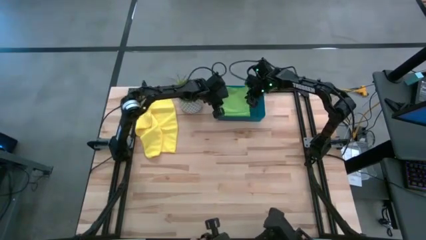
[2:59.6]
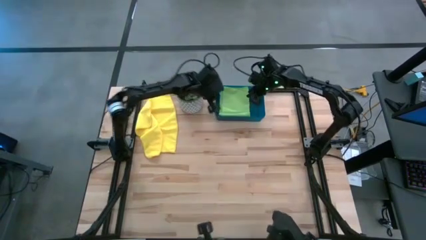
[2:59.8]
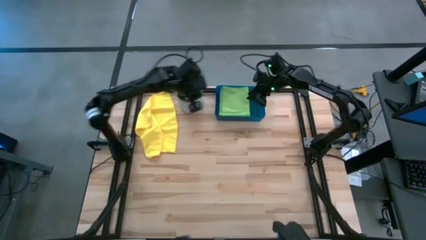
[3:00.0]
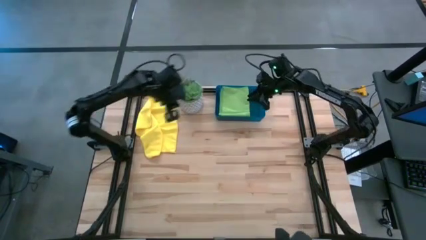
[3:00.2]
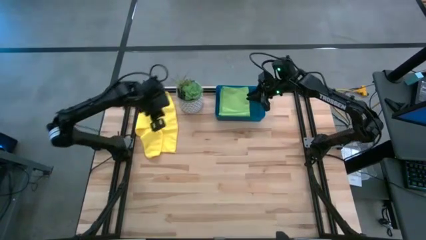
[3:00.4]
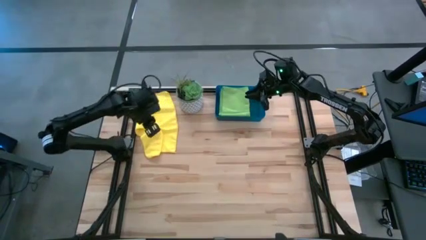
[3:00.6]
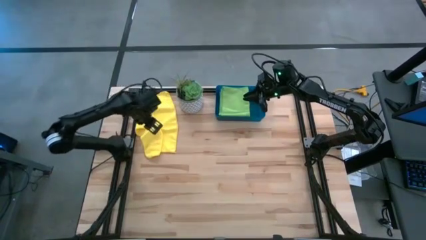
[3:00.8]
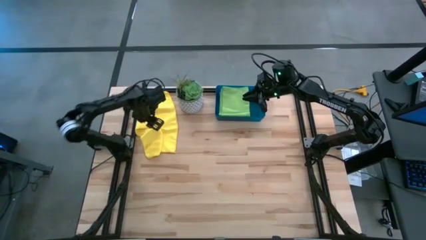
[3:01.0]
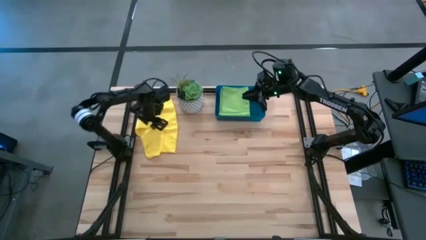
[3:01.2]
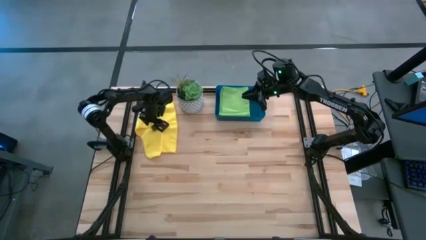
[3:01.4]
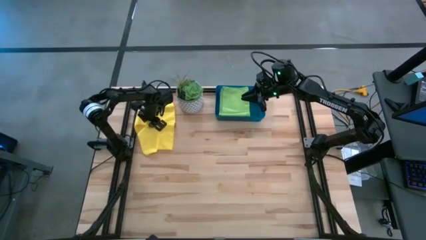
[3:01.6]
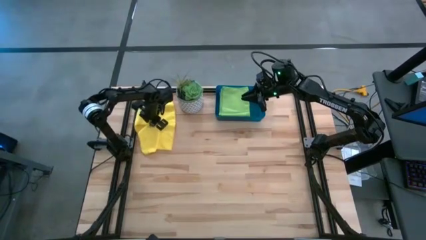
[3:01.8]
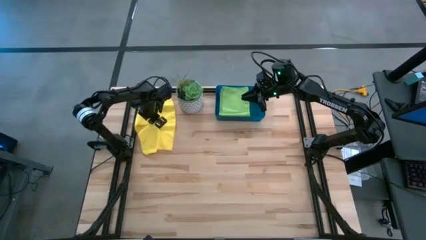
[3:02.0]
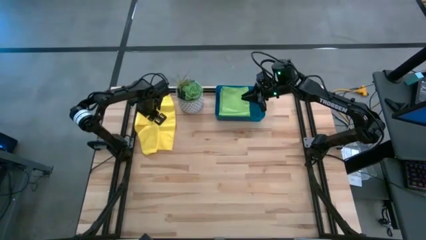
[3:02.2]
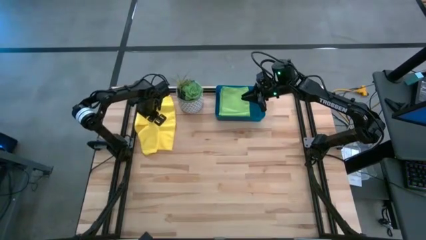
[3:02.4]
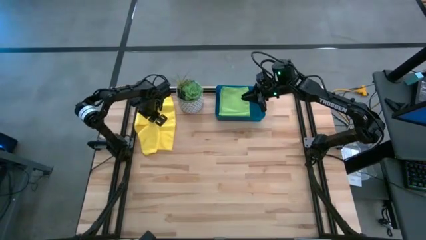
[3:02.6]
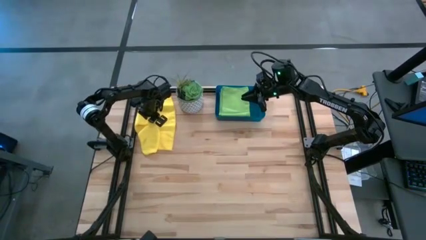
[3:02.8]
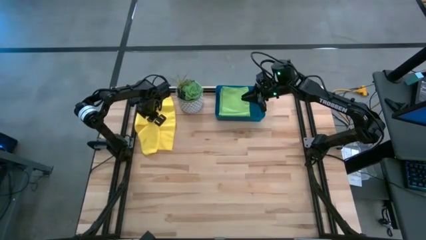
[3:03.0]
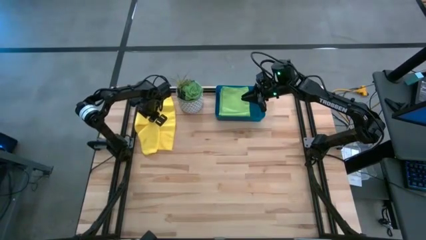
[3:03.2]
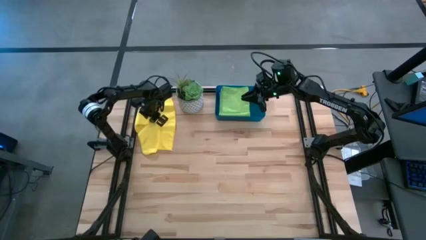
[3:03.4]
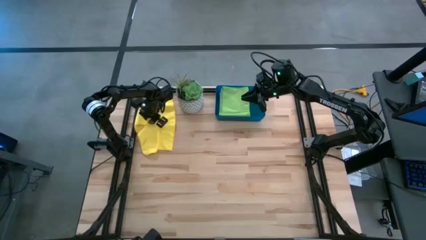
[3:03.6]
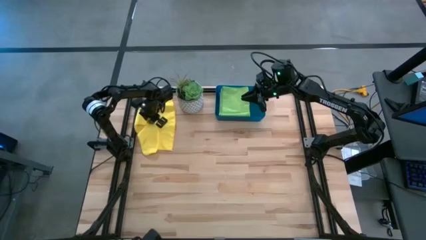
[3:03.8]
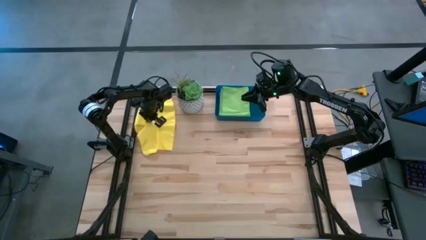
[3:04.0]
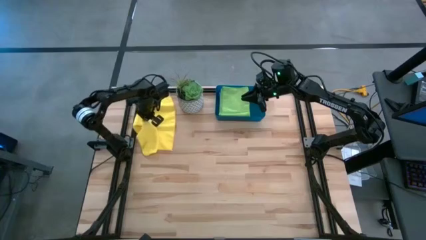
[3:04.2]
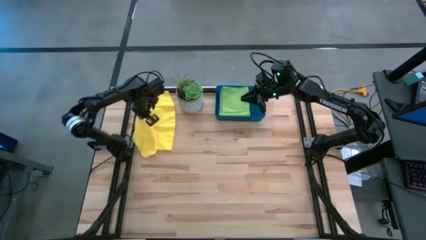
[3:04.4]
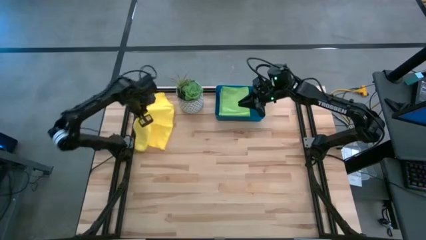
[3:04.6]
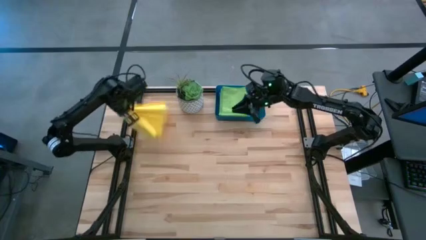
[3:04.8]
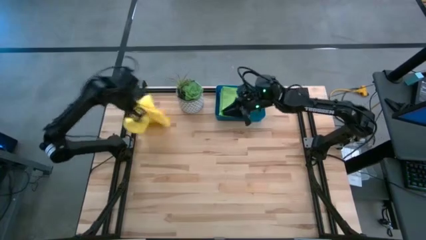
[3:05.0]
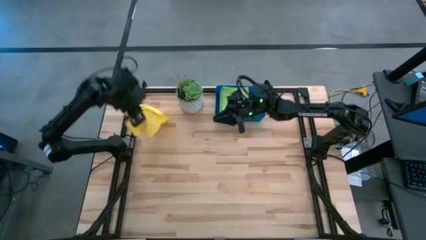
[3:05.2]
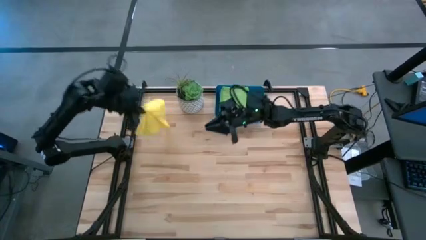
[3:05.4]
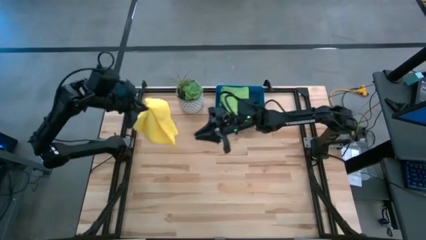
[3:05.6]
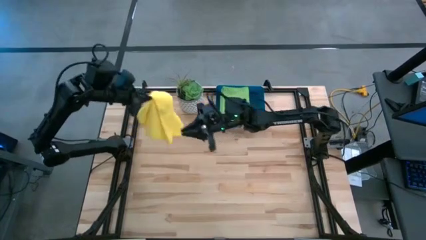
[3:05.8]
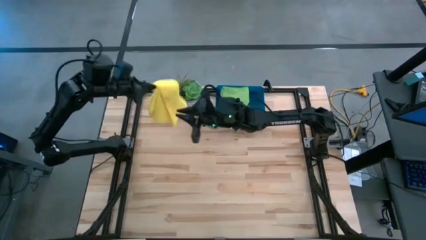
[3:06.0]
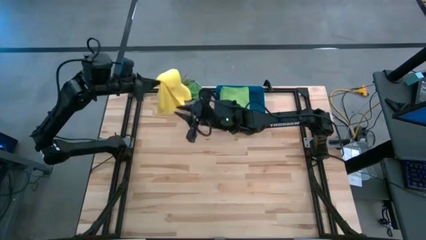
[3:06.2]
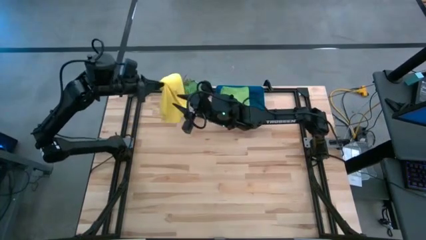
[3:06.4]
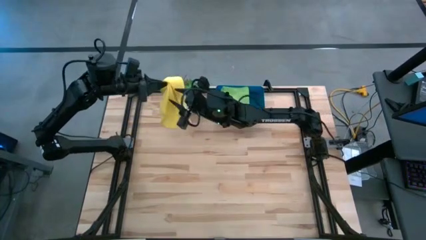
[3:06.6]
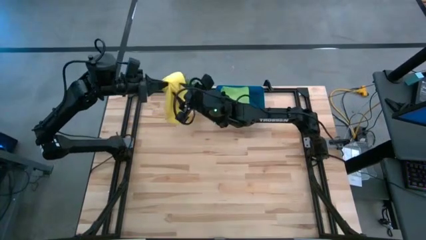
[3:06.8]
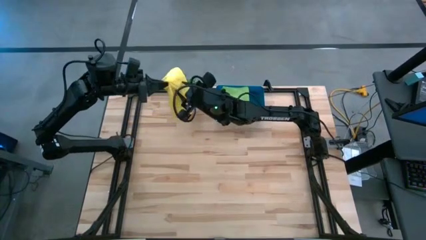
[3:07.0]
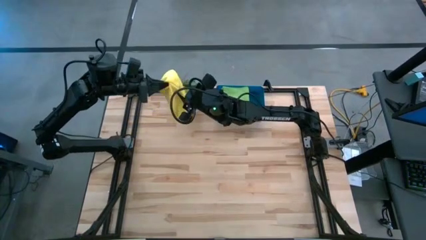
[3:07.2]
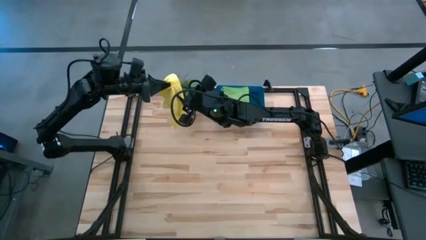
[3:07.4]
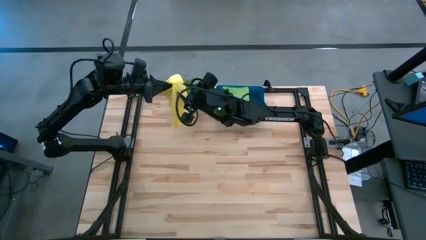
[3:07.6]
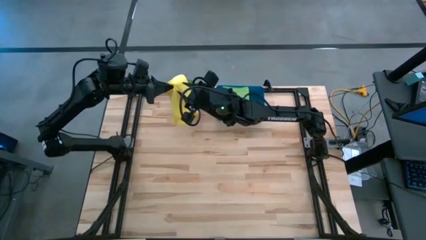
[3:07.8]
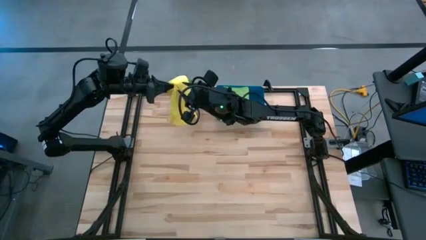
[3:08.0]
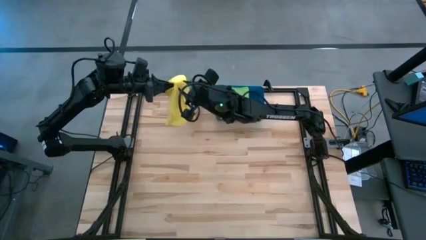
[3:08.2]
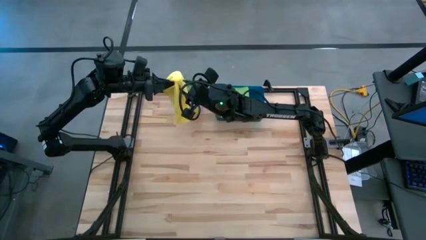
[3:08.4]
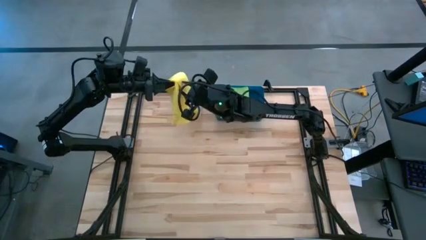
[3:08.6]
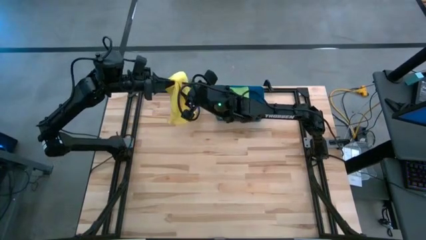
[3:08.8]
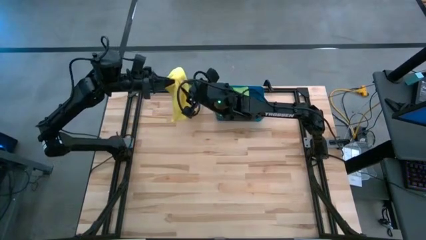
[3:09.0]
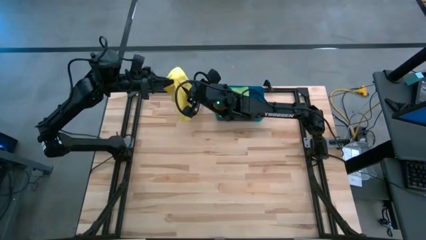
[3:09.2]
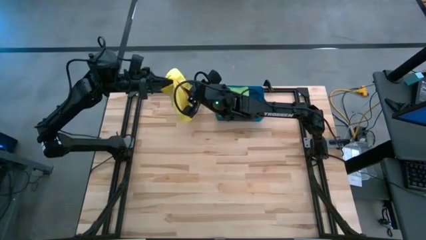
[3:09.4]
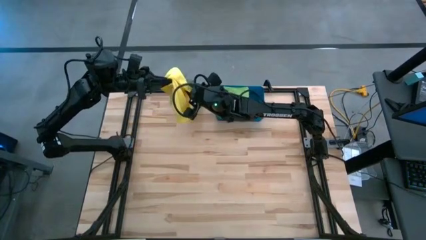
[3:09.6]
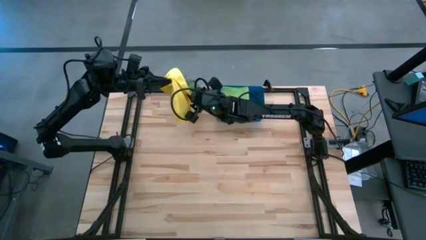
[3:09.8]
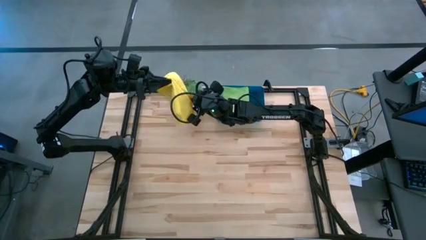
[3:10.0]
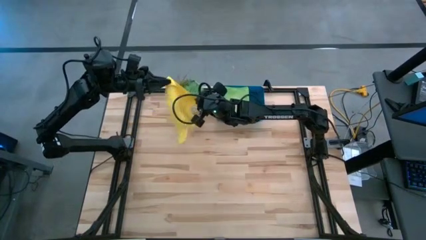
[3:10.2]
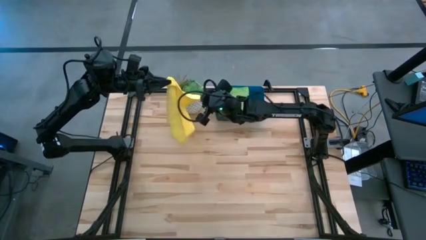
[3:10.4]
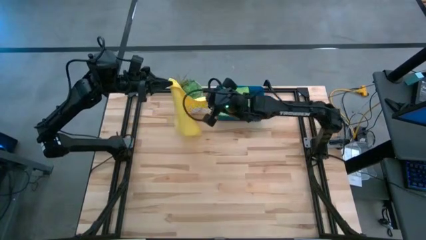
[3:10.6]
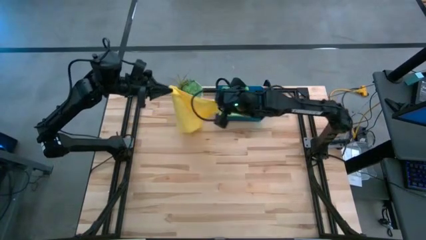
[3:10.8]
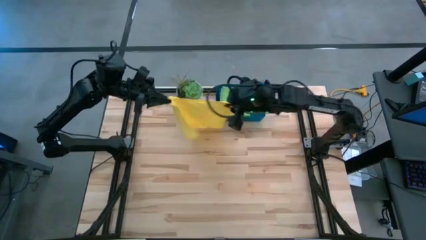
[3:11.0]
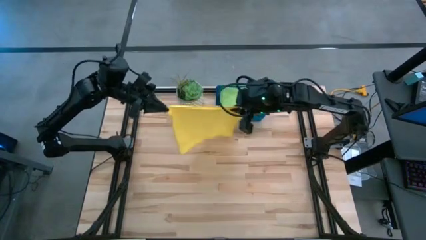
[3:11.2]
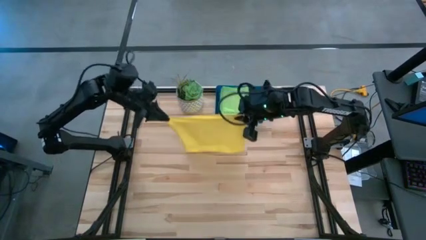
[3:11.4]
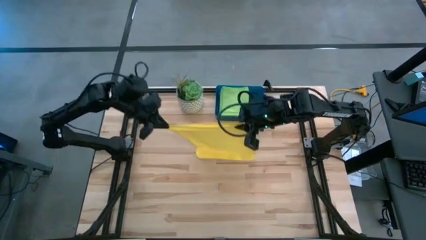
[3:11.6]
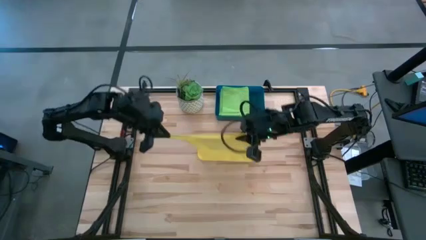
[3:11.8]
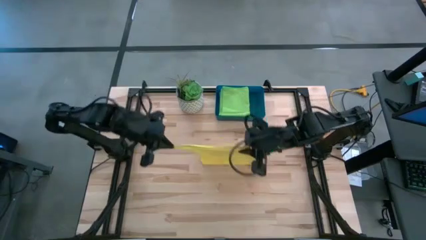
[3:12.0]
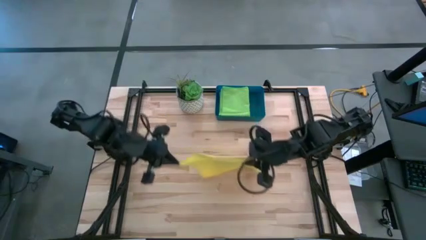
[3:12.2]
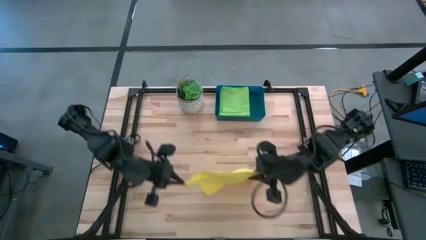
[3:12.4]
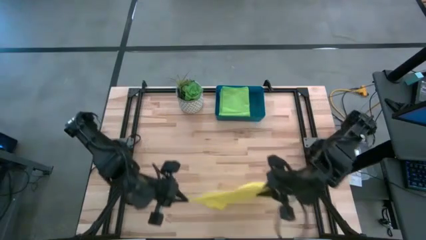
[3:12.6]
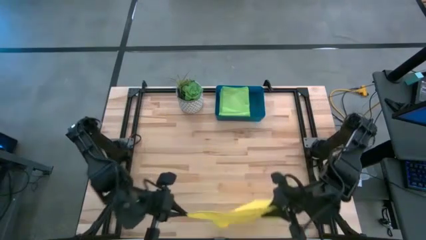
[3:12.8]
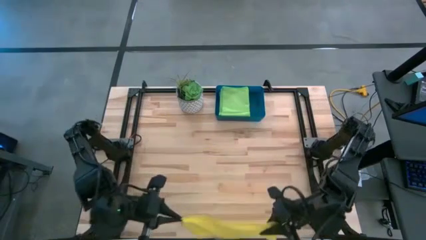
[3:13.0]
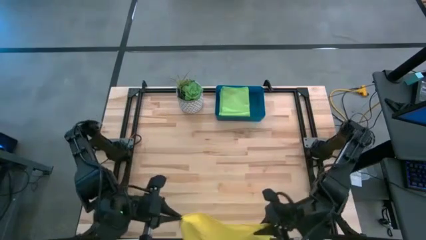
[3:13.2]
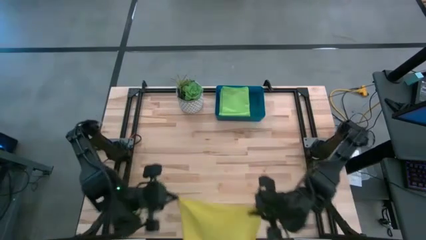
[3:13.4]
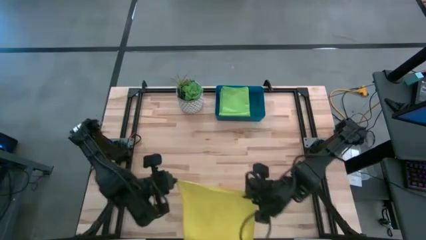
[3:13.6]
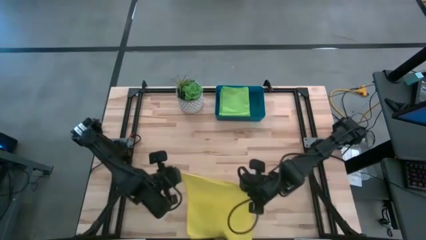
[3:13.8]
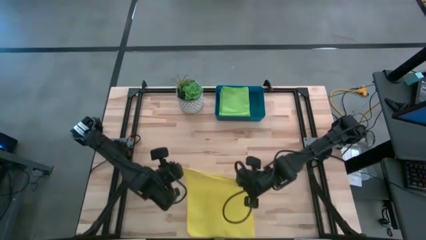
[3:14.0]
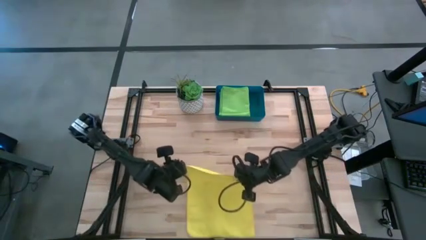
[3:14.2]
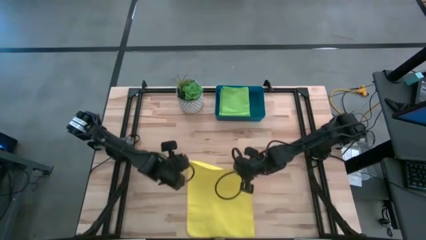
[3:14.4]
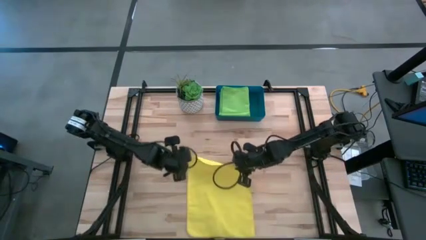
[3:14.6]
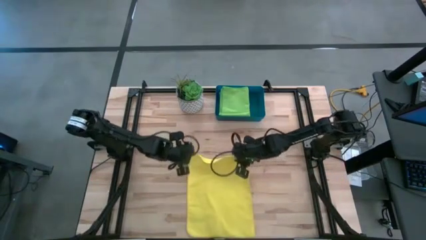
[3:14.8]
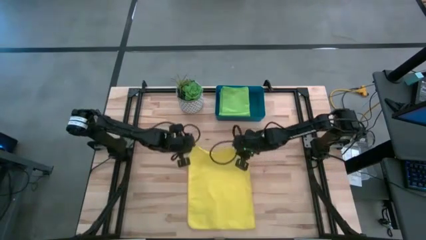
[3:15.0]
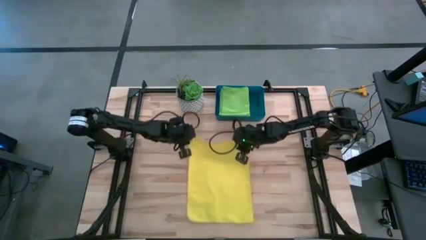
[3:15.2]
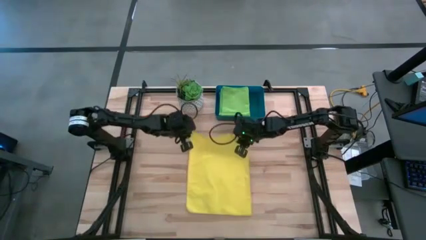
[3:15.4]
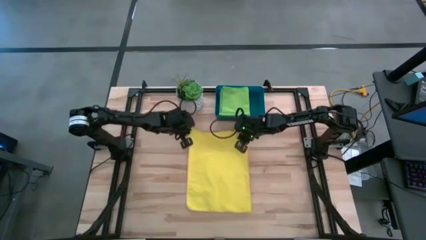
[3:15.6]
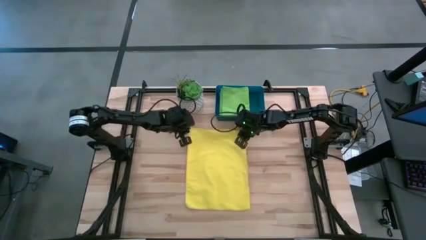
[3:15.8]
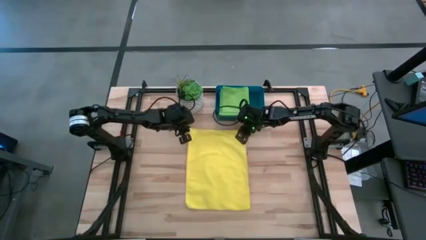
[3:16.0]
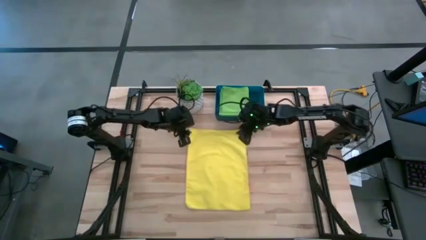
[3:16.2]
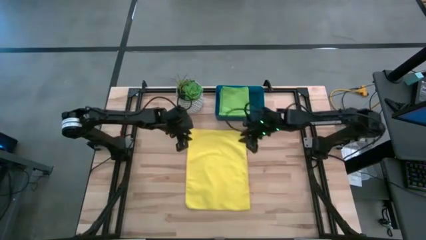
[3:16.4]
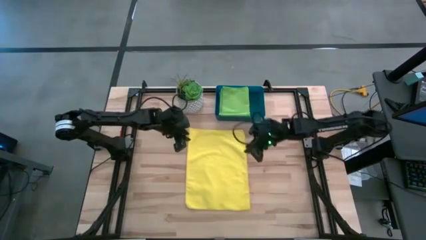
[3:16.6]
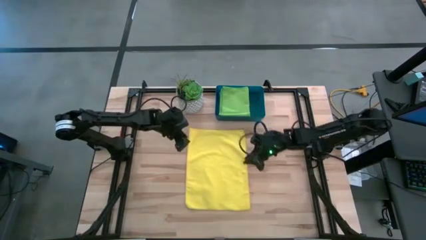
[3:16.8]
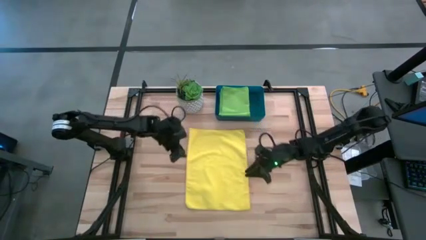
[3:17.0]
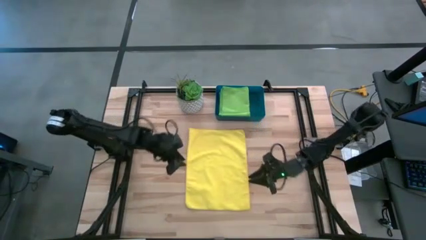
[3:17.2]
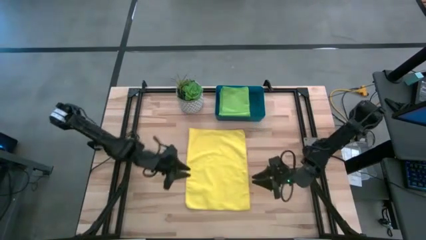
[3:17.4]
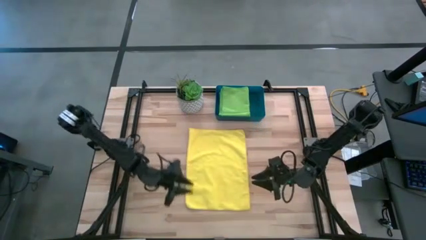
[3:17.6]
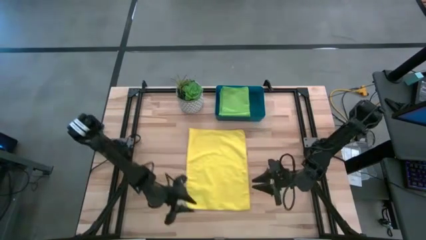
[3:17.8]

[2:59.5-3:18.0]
Task: Fold microfiber towels
Fold the yellow microfiber towel on top of the green microfiber towel into the dark blue bin
